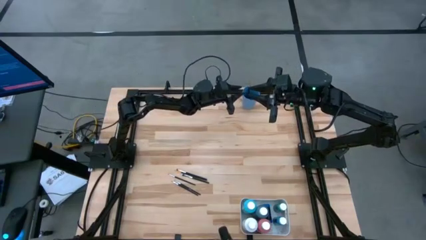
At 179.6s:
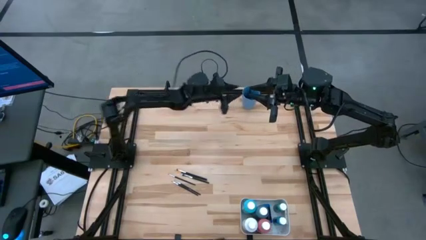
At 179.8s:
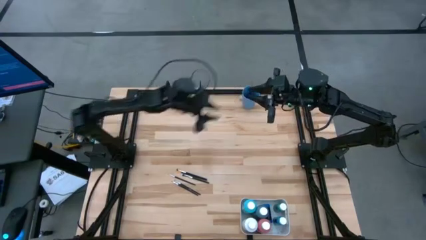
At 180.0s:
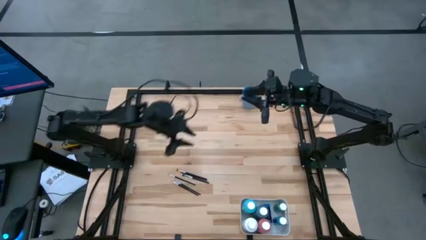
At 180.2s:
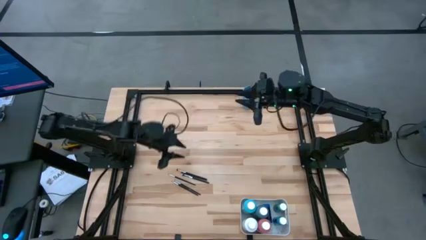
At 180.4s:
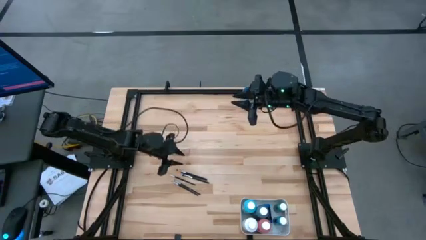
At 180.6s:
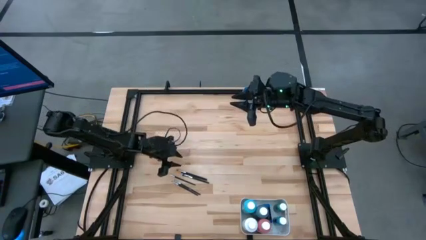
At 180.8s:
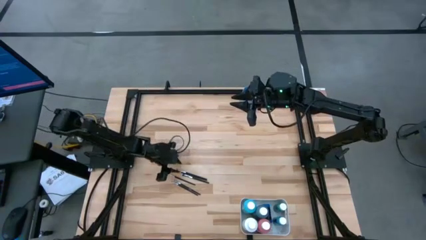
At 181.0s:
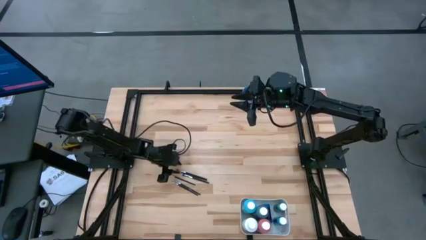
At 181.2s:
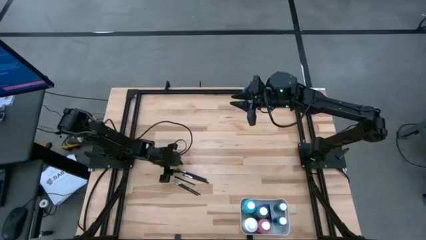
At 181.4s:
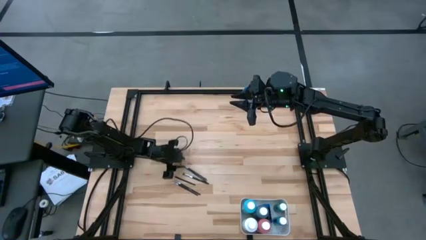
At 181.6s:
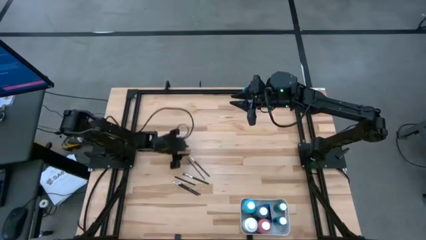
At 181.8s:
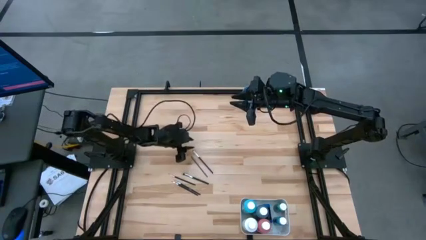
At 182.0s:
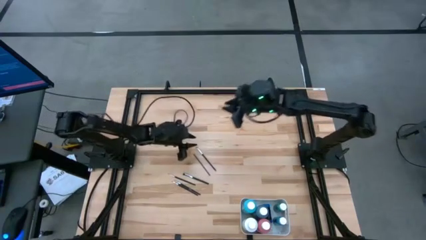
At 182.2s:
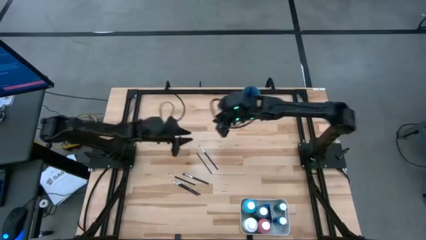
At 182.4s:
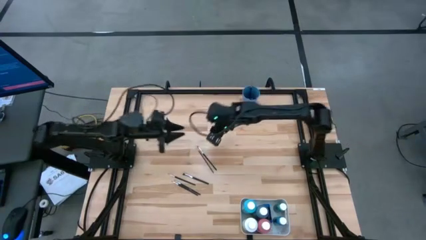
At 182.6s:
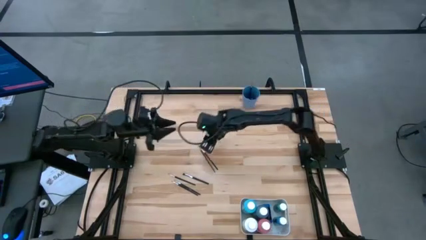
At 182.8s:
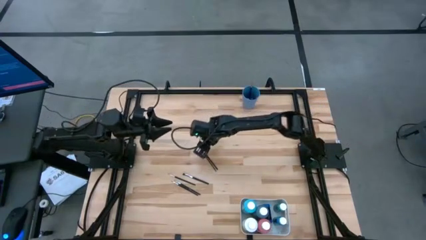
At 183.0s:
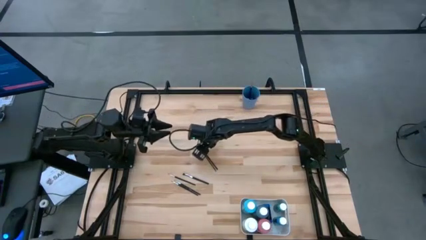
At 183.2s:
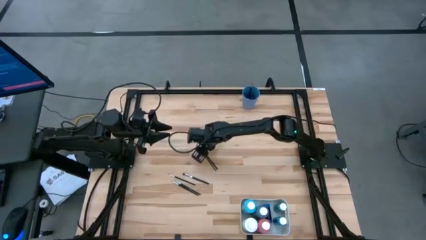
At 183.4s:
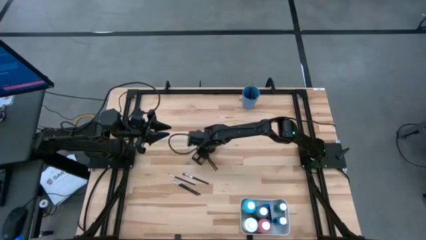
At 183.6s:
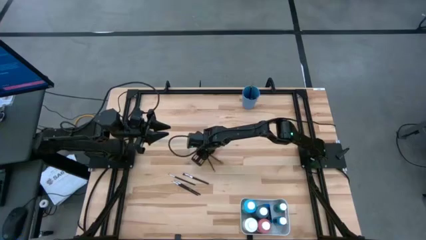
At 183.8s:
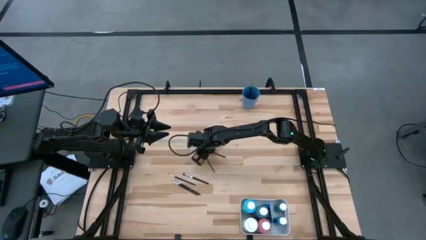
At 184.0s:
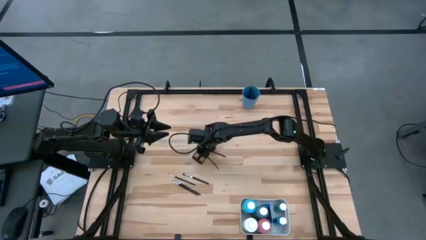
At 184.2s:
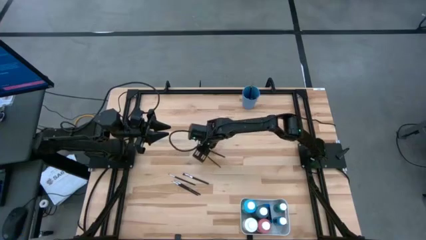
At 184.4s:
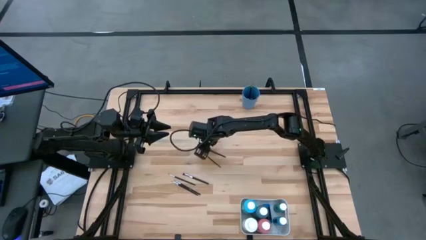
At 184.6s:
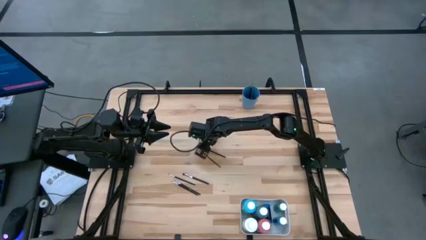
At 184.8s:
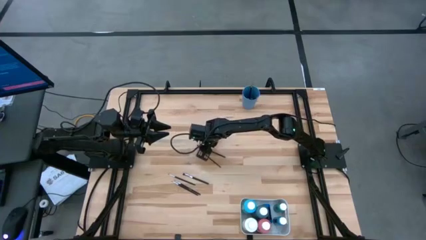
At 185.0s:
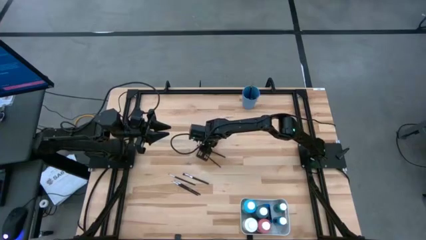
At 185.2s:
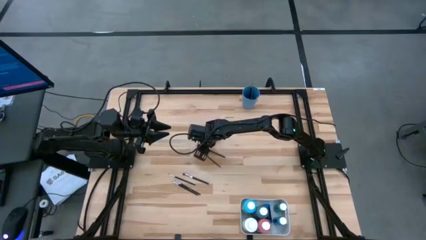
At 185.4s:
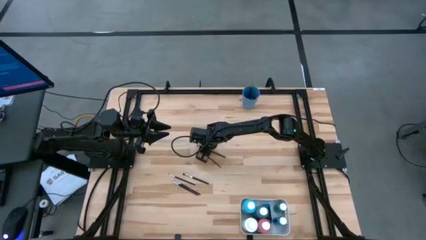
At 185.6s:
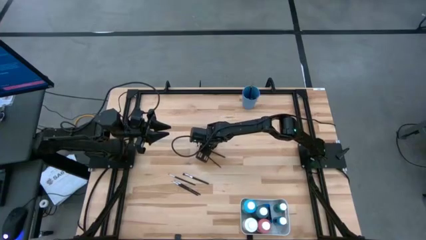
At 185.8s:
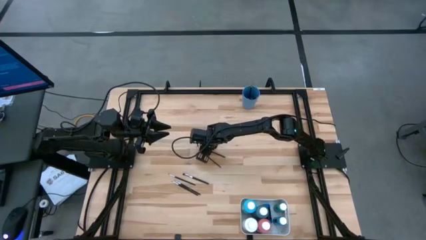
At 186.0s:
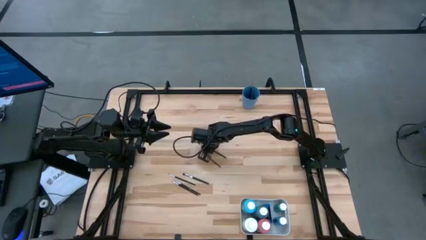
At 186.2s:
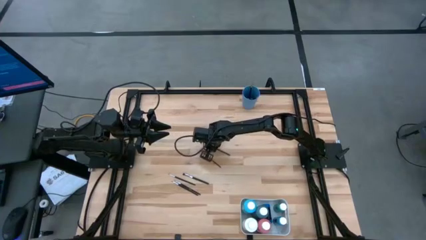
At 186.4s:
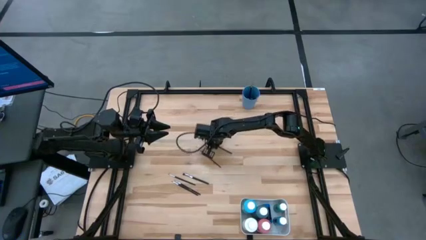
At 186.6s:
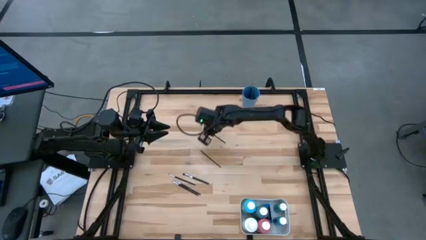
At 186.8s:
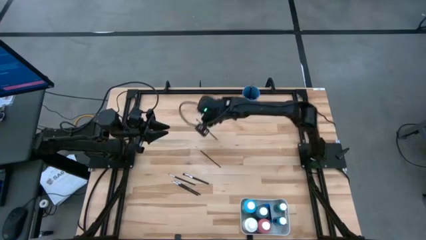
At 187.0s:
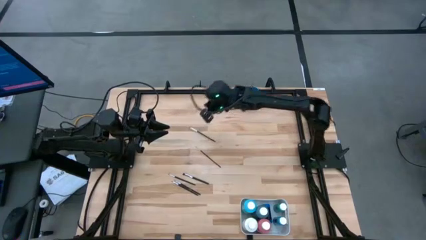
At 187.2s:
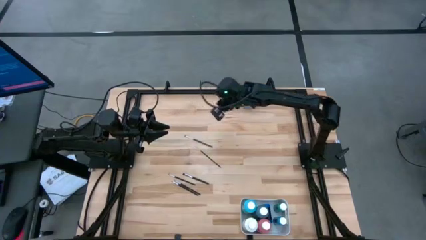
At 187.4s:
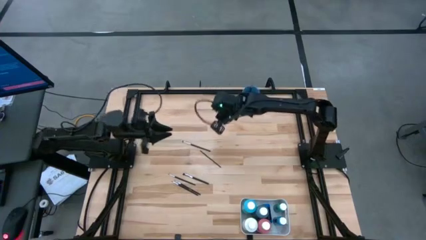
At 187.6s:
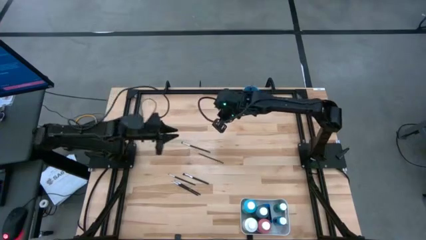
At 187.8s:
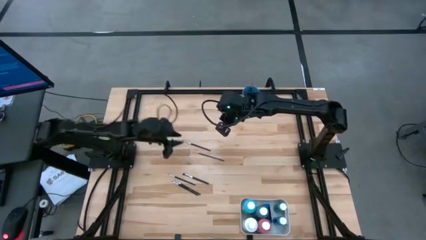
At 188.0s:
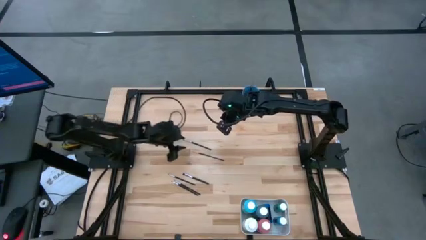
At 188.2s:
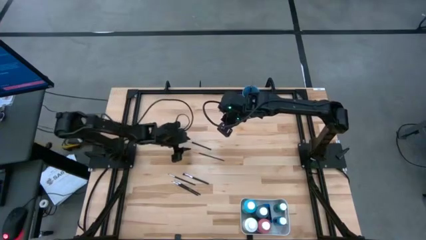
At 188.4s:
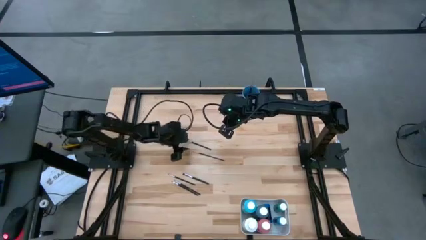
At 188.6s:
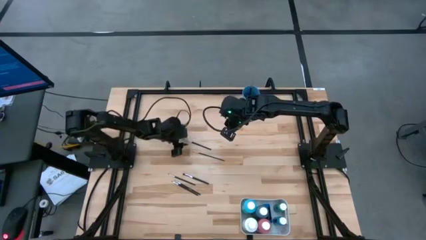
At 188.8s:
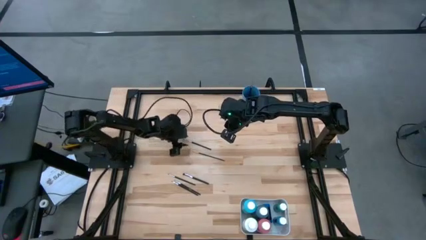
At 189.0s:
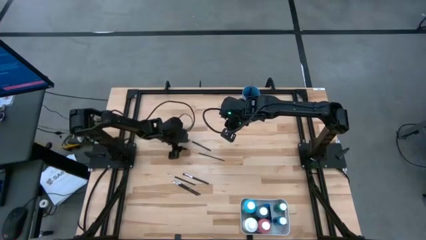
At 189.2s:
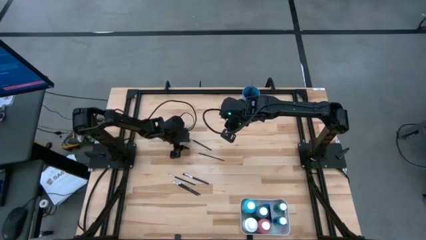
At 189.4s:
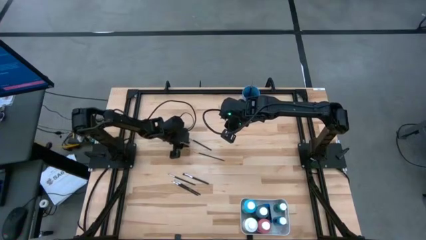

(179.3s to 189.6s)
Task: Pick & Place Paint Supplies
Put the silver paintbrush into the blue cup

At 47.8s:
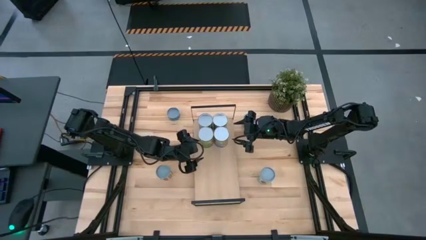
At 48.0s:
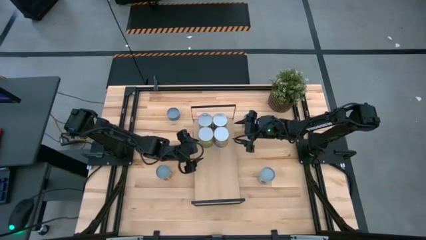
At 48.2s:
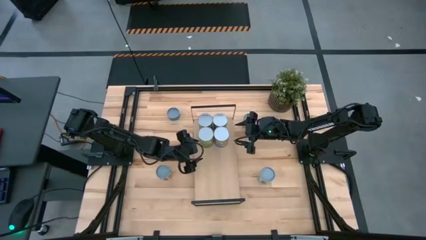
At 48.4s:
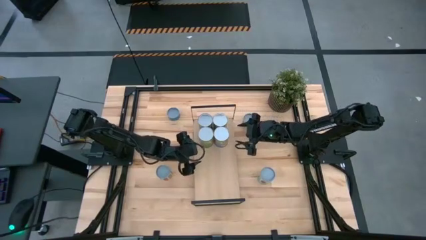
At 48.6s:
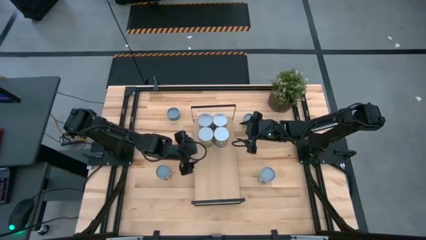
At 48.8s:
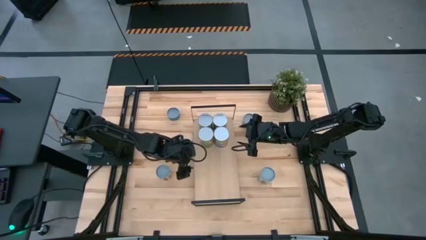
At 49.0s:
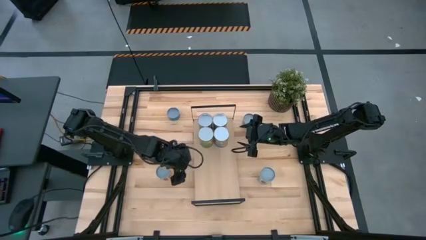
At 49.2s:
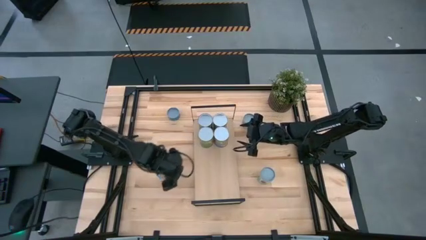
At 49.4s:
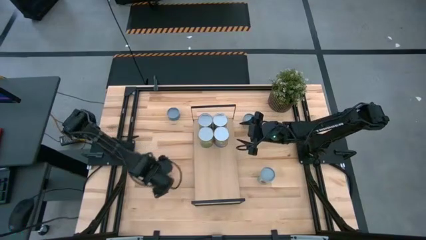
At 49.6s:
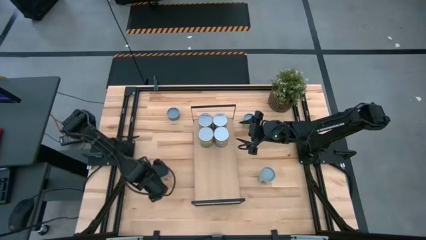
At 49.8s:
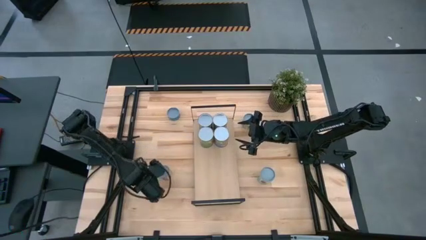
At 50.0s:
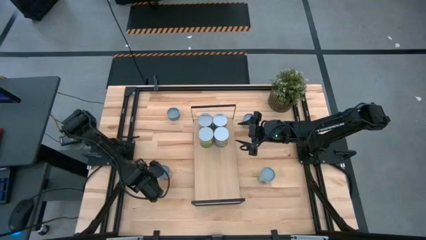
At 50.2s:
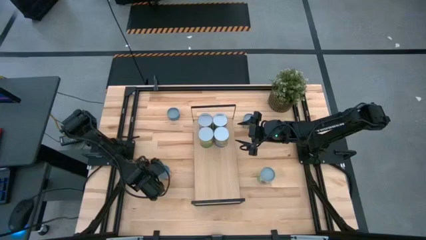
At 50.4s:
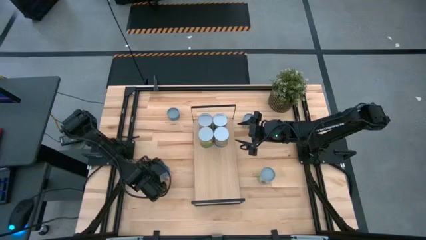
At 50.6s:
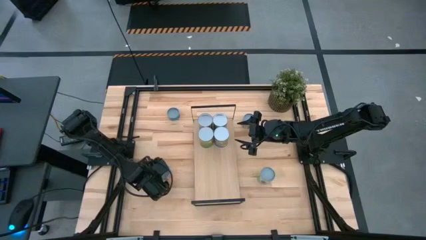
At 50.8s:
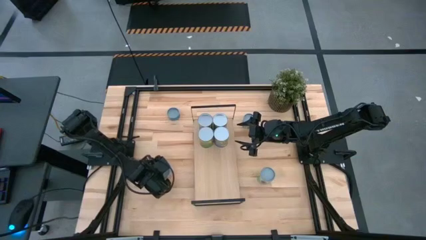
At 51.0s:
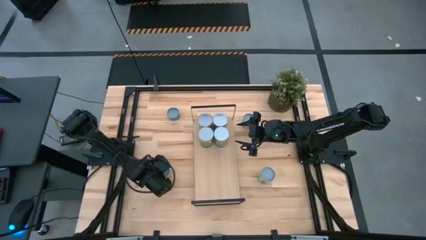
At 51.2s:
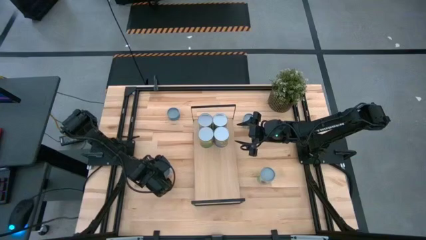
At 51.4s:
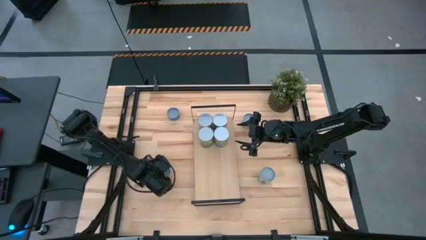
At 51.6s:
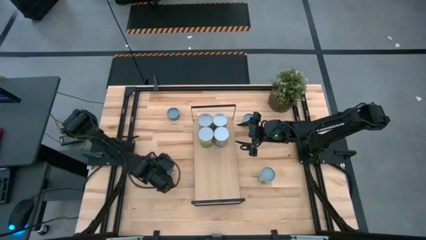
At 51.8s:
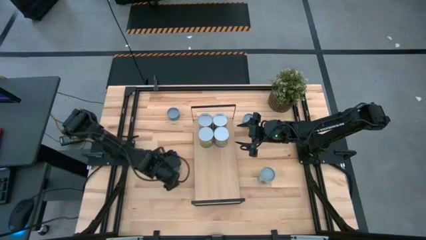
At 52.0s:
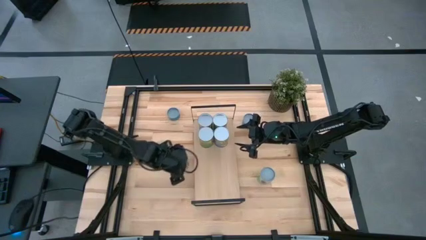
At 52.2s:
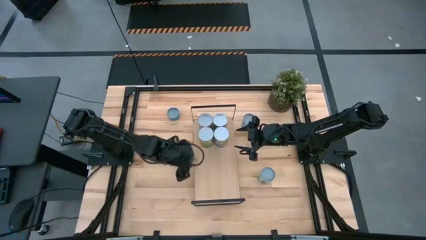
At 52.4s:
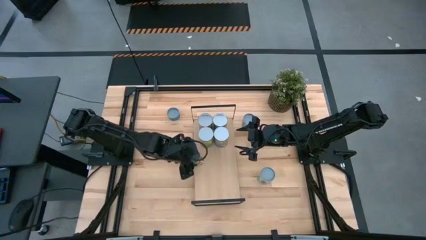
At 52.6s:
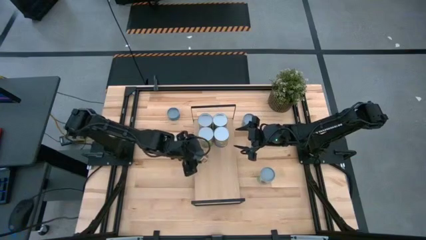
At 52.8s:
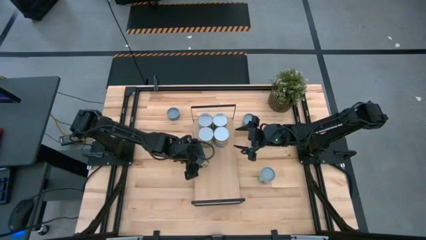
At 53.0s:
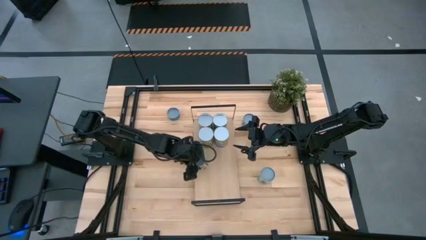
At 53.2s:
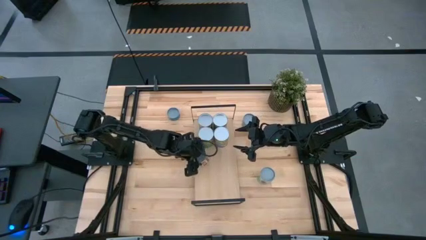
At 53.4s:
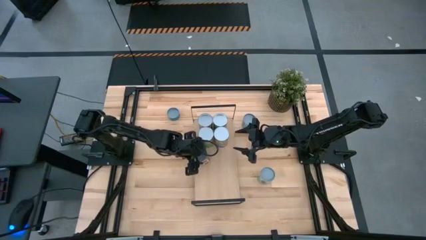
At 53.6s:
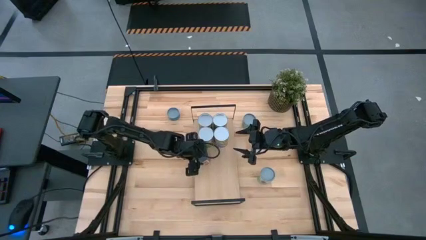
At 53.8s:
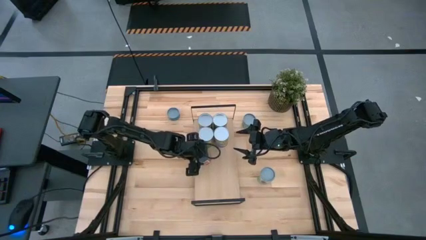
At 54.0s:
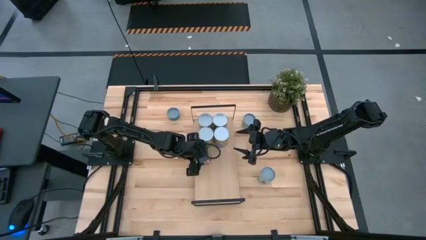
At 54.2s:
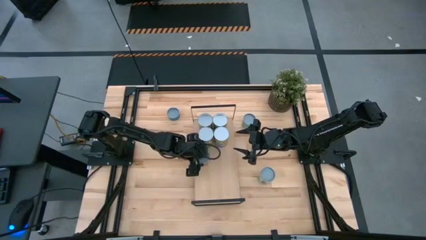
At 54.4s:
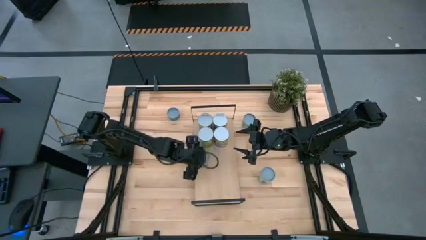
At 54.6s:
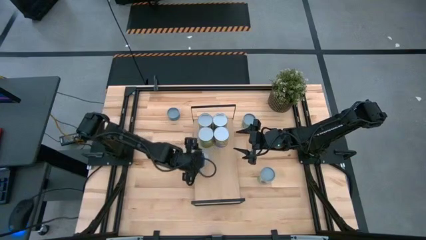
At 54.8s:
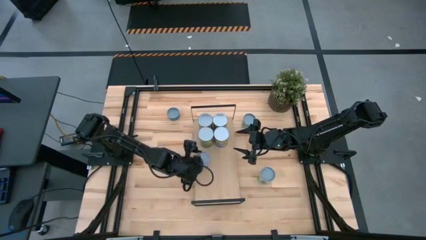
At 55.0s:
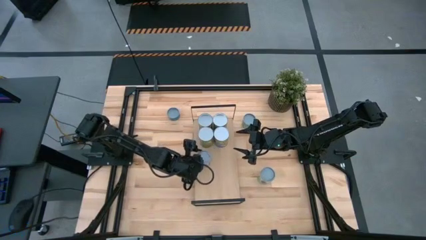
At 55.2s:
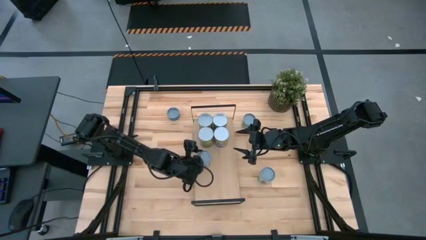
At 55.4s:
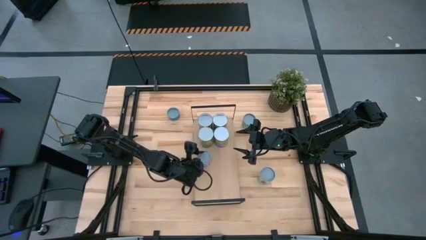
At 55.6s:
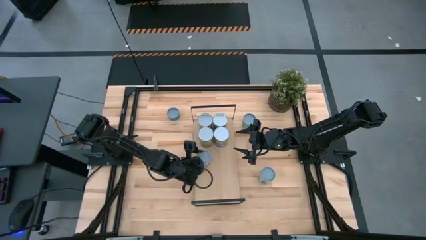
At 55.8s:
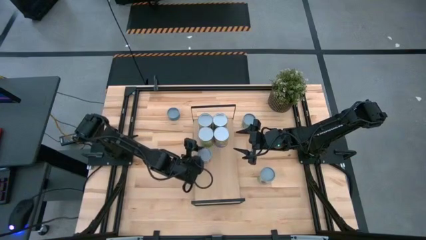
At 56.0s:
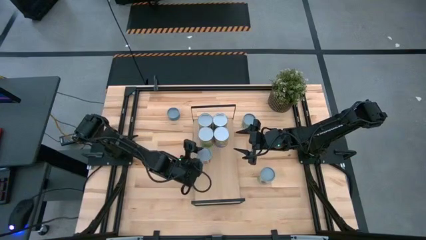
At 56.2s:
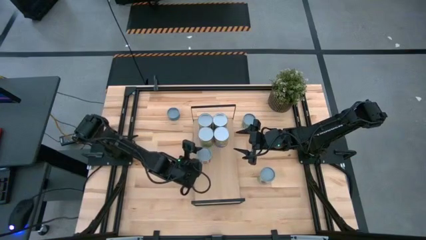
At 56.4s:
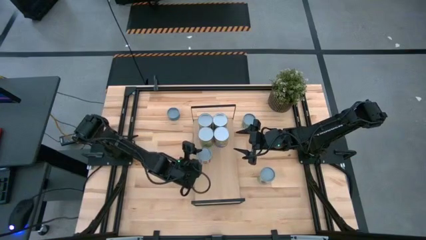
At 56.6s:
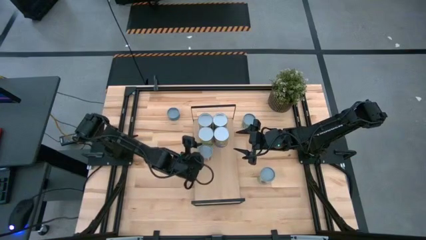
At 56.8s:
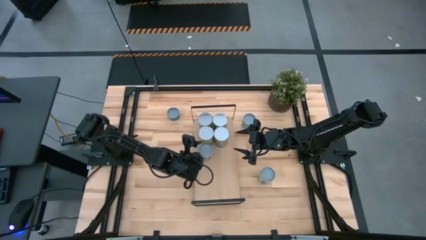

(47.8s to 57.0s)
Task: Pick and place cans onto a shelf
Put the canned diced tomatoes on the shelf
